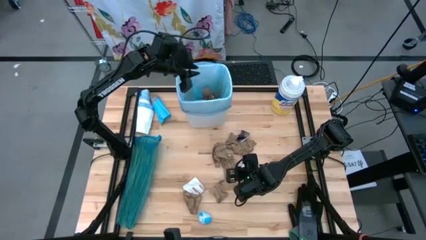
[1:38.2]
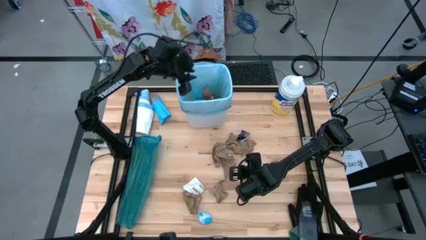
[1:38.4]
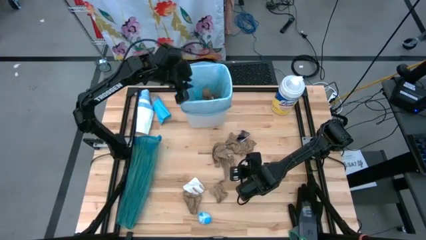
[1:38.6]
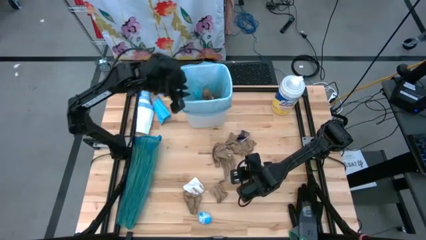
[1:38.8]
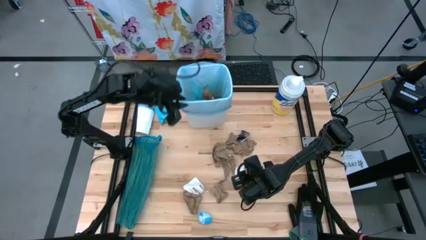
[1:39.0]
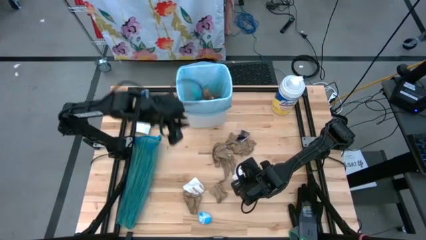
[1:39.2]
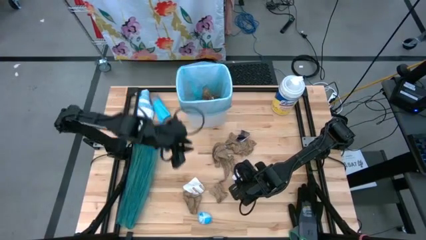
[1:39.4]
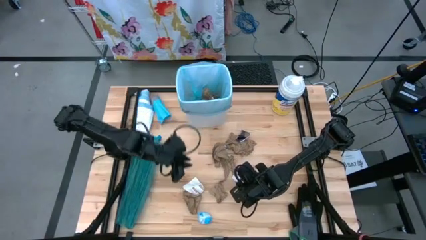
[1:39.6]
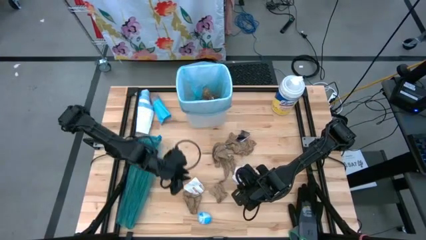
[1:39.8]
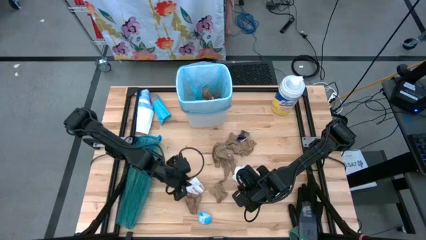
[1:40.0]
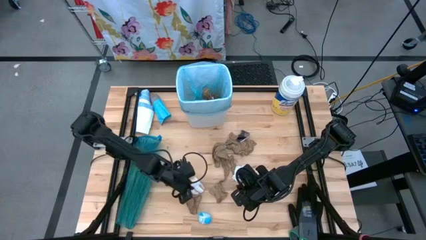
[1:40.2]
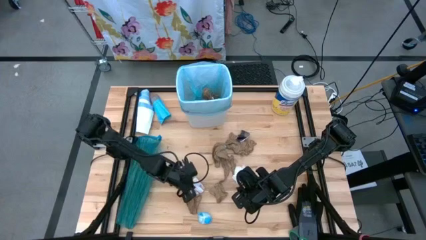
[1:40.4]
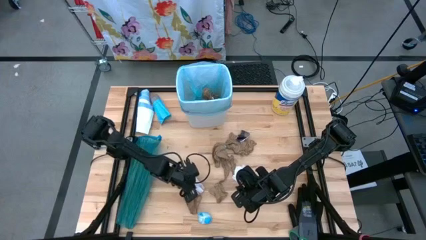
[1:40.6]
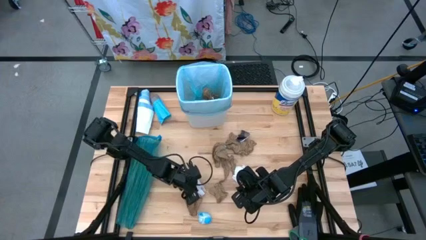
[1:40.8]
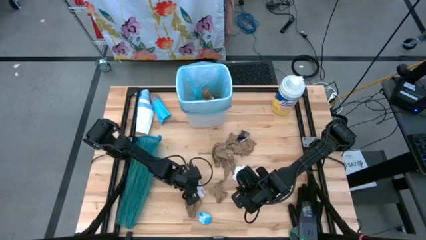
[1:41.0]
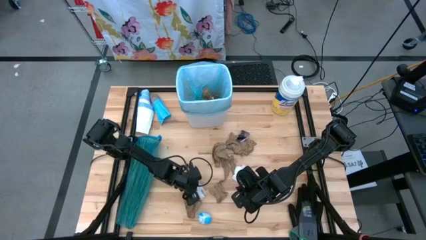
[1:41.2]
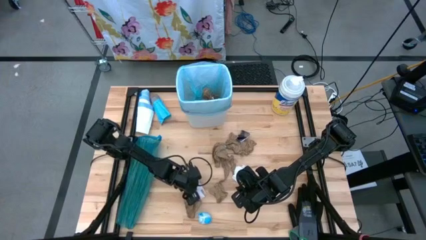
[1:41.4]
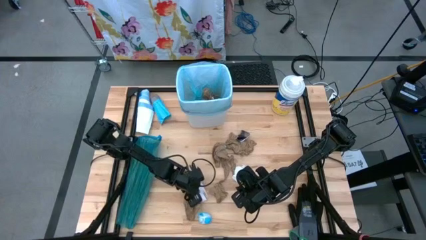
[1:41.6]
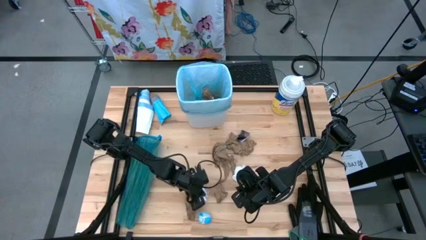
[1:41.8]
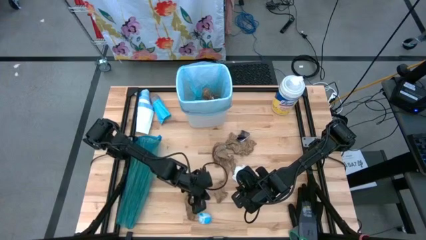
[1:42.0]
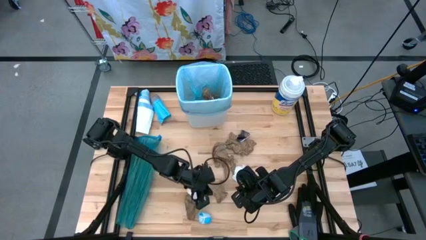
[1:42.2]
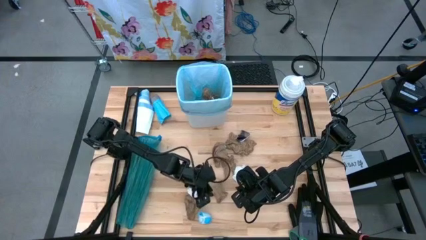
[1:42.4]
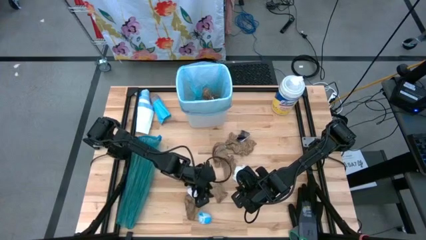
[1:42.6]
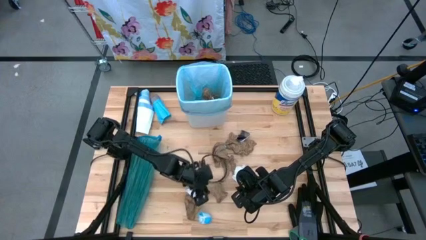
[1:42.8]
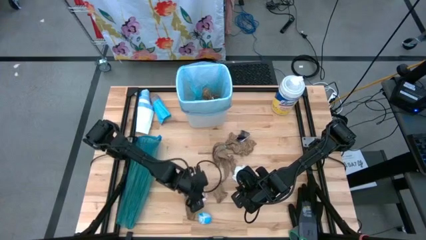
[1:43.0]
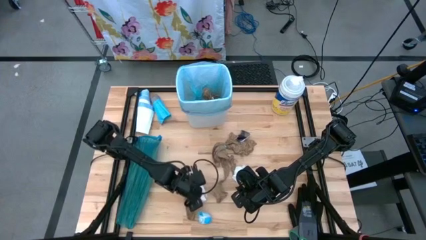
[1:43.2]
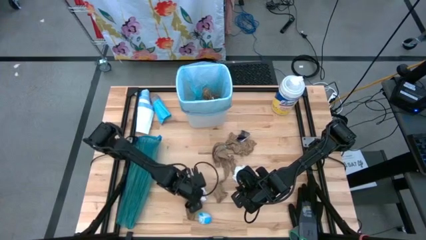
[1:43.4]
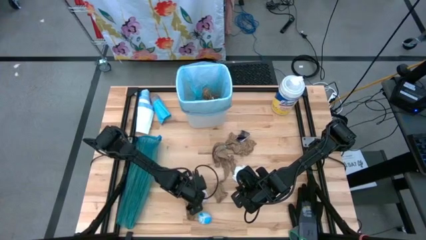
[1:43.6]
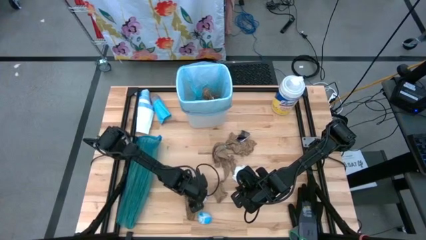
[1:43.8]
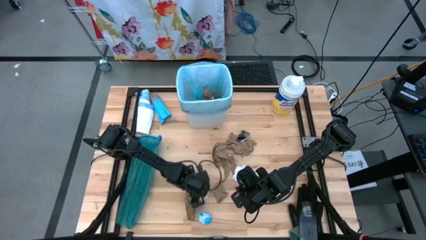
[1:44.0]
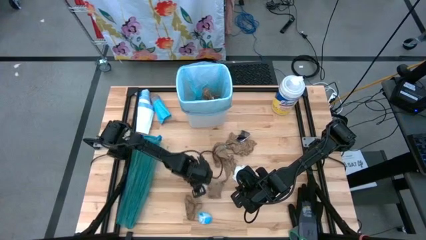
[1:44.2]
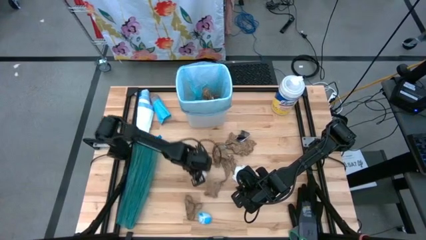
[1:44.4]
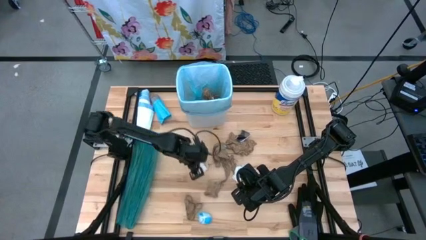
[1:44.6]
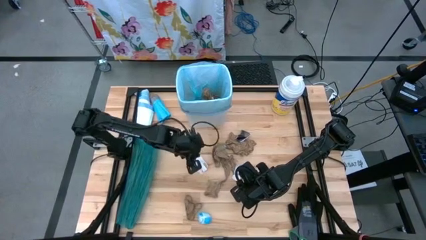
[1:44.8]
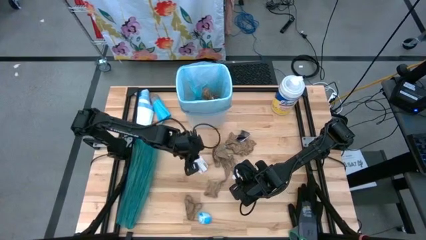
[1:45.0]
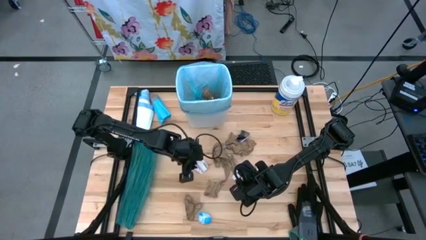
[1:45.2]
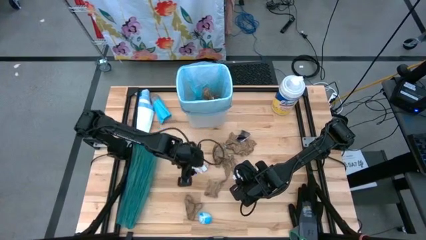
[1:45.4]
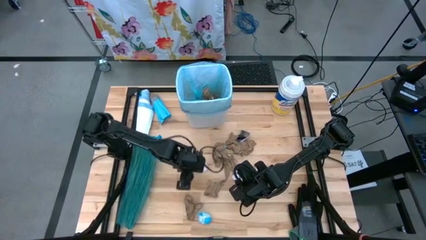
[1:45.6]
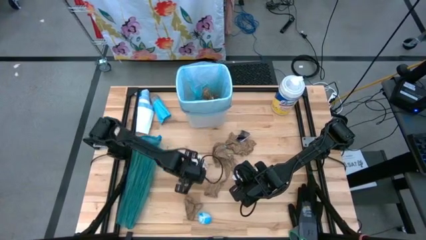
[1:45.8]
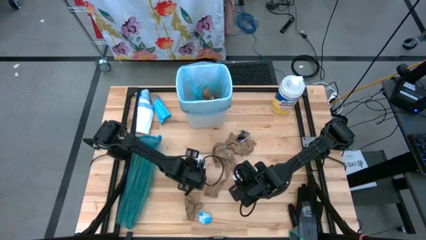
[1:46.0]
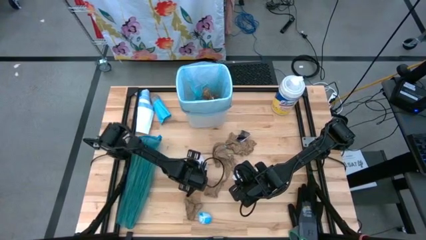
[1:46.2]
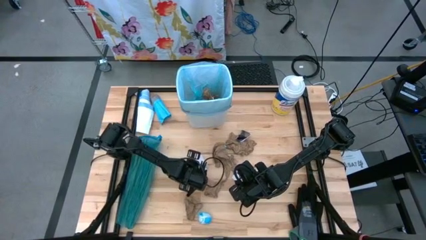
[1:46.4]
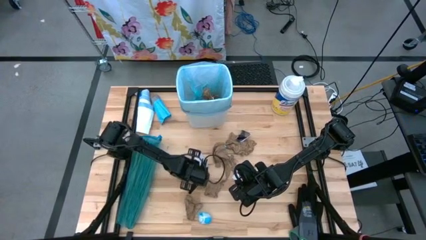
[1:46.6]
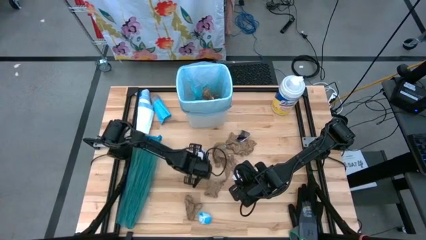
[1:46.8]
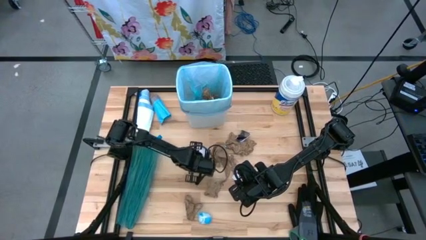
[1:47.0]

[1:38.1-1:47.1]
Task: place trash/remove bag and relplace
Put the white paper into the white trash bin

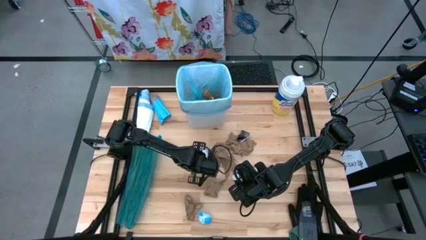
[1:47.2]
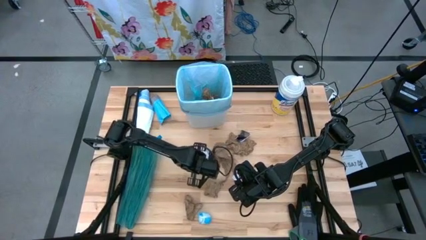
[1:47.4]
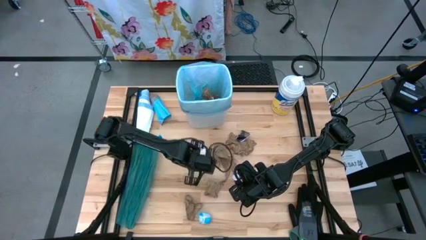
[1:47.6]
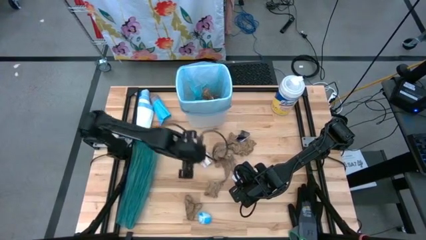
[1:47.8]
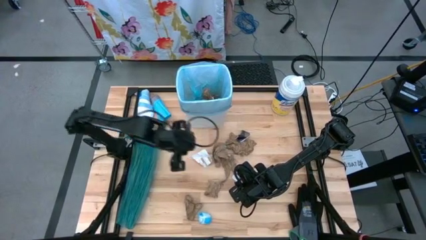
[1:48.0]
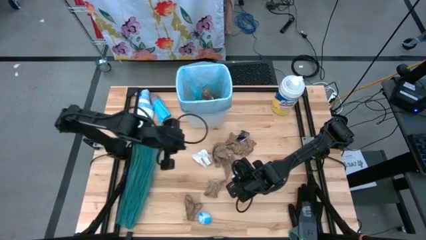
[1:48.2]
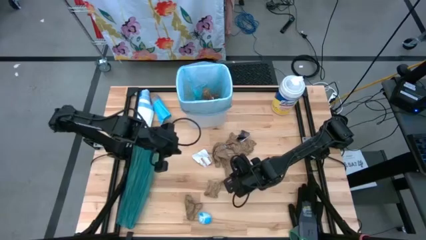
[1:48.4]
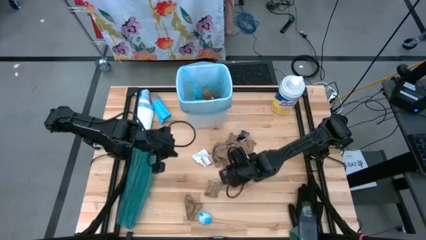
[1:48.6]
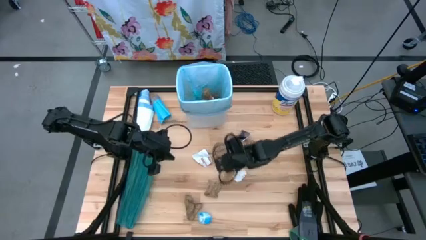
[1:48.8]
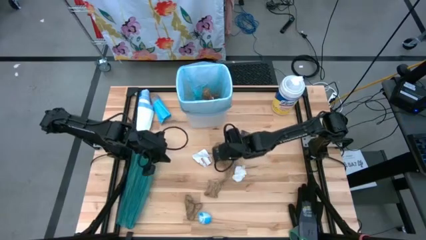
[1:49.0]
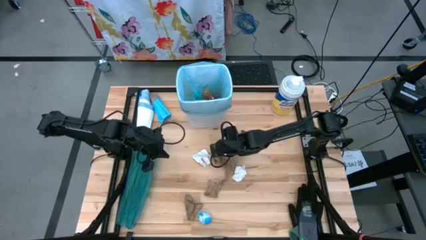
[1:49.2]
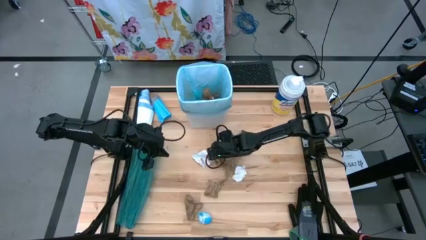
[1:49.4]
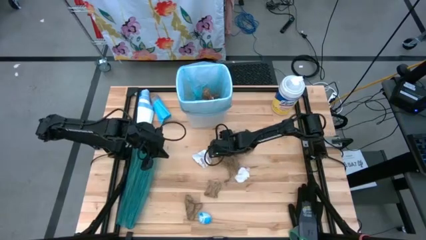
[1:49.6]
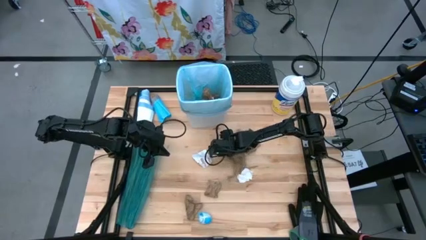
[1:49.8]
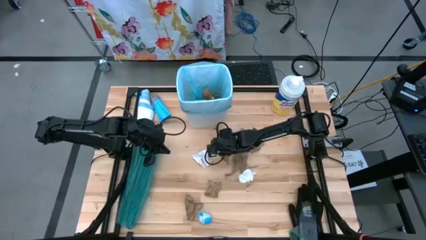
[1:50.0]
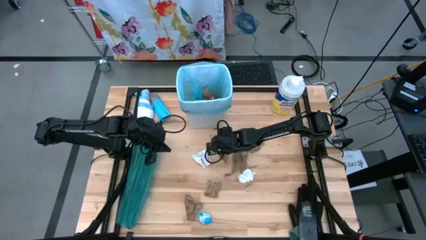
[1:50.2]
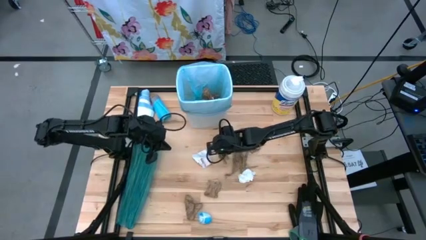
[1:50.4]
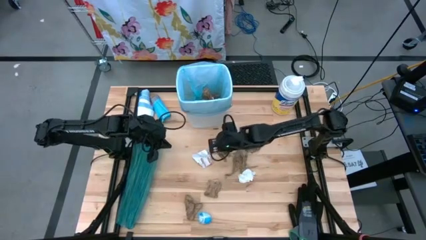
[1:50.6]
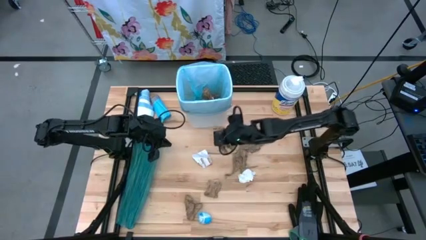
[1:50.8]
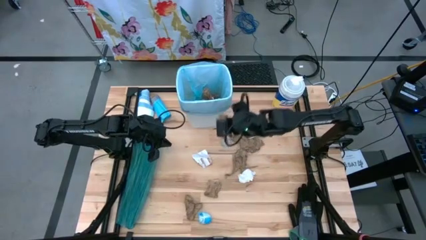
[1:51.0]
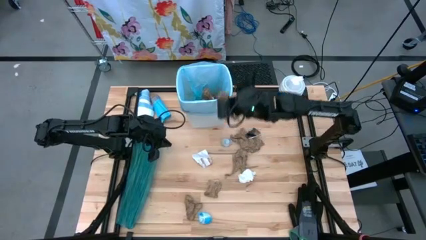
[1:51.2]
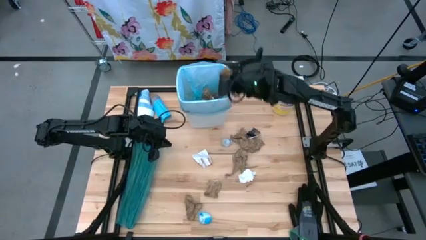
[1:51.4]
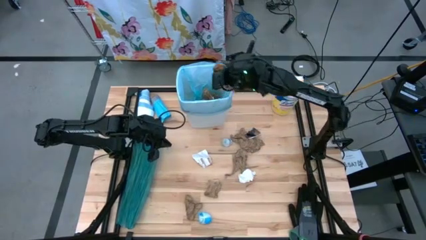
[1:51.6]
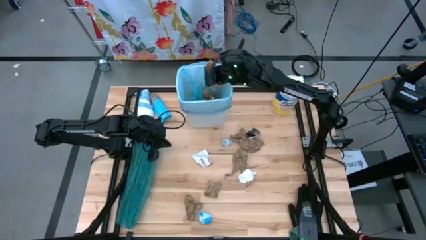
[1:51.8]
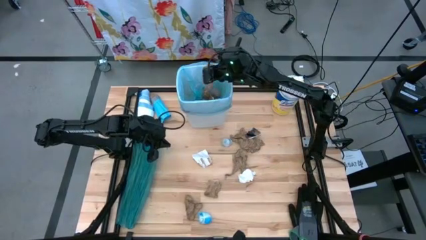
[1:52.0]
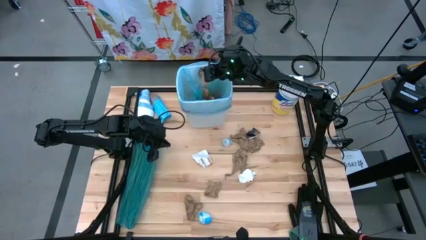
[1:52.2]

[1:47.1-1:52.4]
Put the brown napkin into the white trash bin

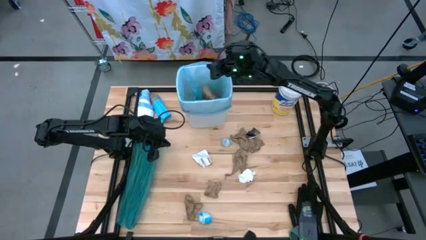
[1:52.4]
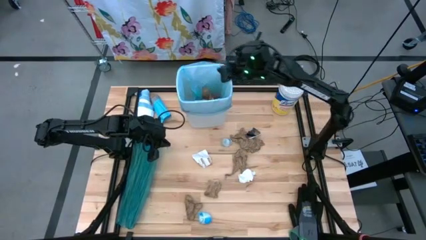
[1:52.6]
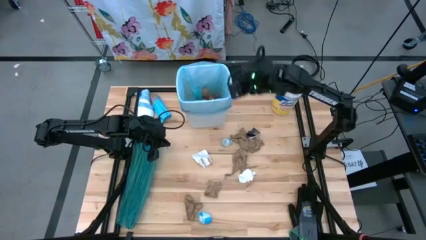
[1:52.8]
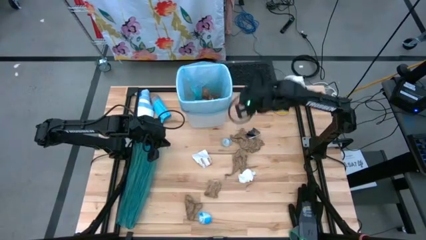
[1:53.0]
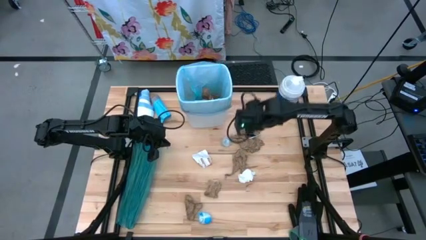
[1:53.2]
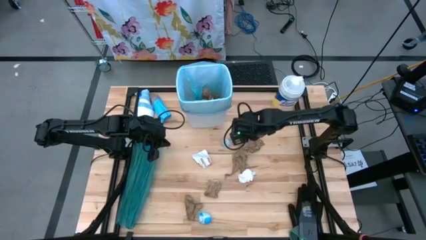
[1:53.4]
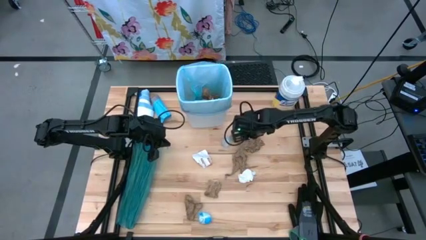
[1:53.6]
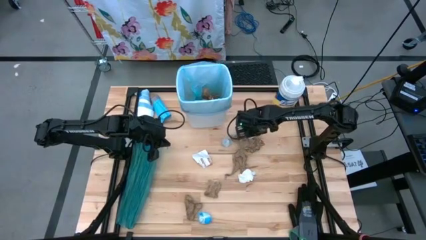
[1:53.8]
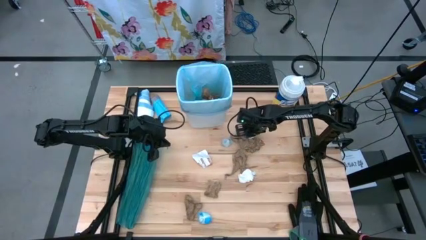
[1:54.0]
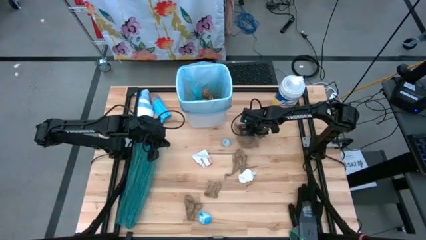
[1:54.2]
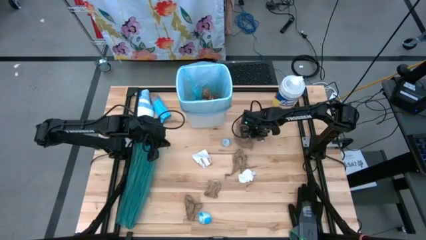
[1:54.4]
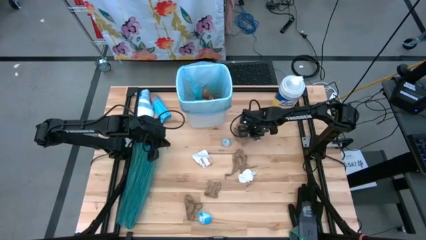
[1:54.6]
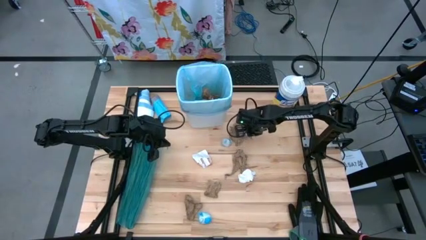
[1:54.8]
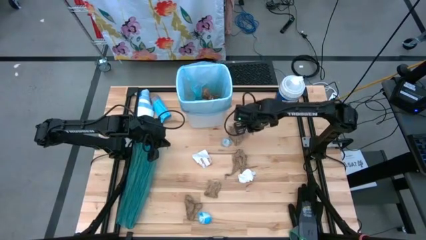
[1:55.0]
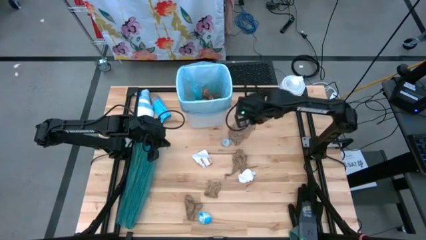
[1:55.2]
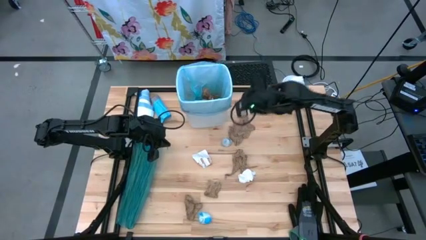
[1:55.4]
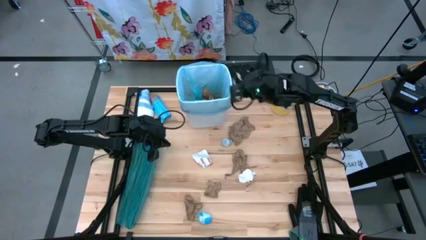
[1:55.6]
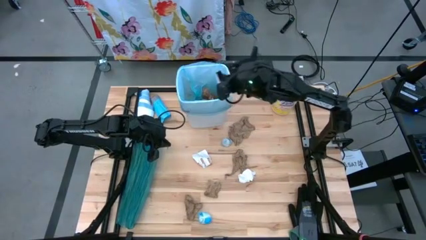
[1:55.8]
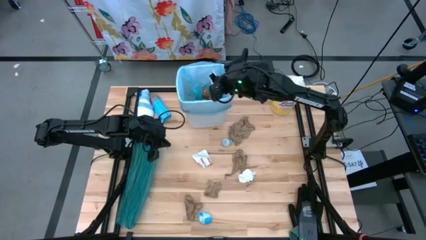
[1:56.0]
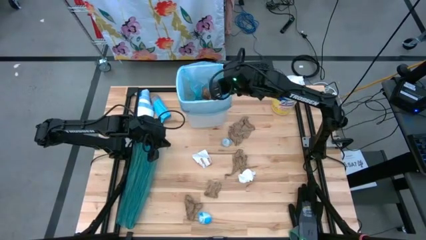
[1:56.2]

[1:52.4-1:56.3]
Put the white paper into the white trash bin
